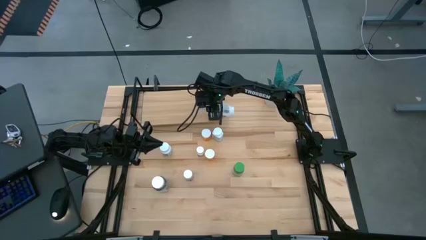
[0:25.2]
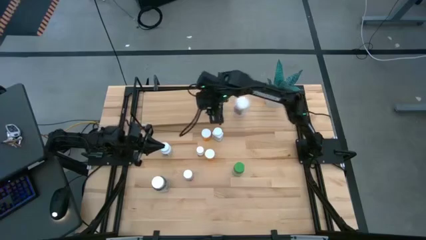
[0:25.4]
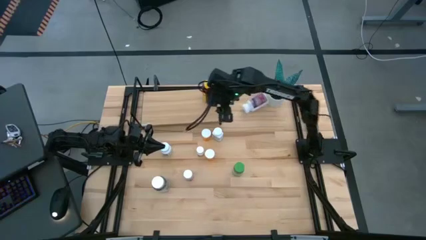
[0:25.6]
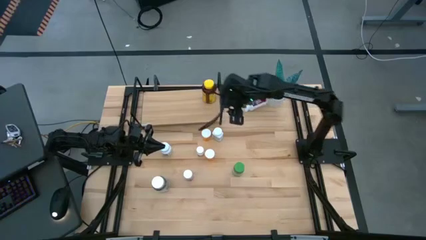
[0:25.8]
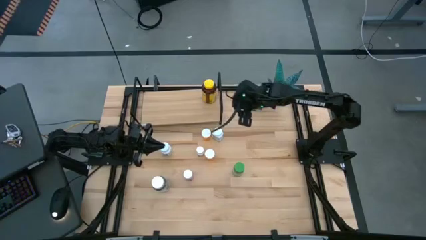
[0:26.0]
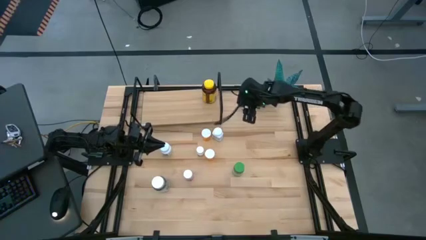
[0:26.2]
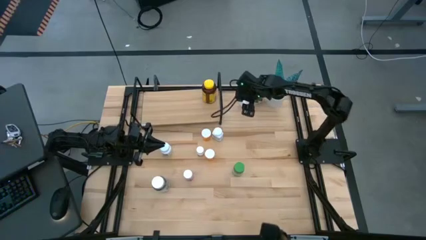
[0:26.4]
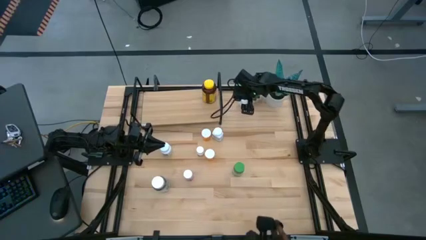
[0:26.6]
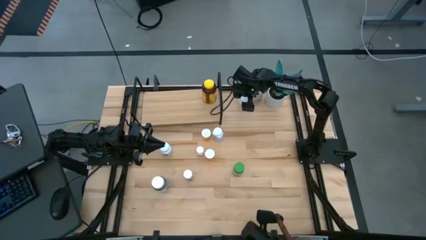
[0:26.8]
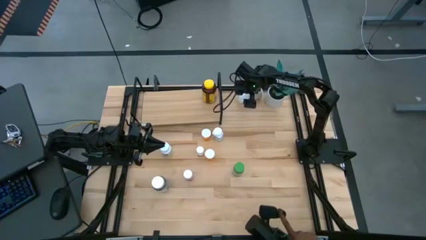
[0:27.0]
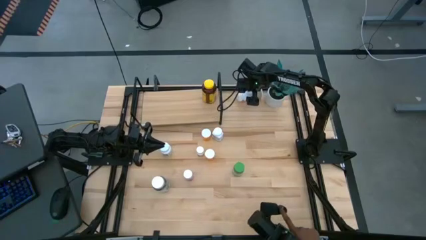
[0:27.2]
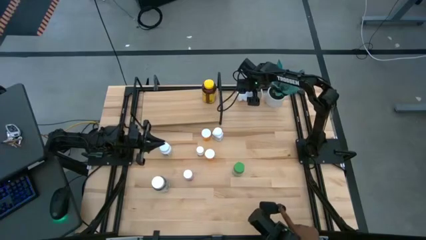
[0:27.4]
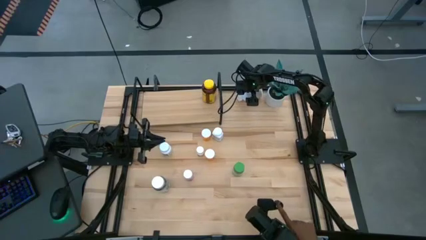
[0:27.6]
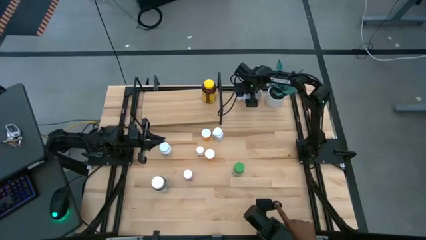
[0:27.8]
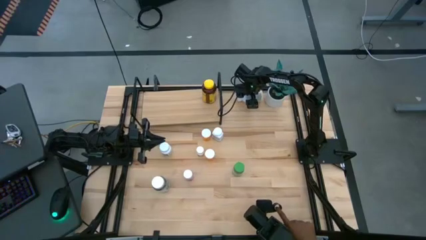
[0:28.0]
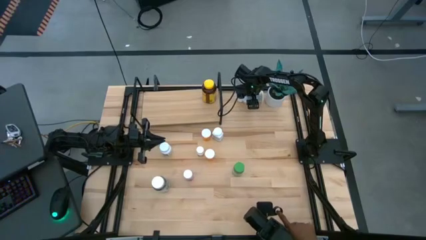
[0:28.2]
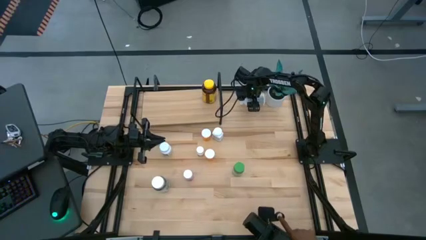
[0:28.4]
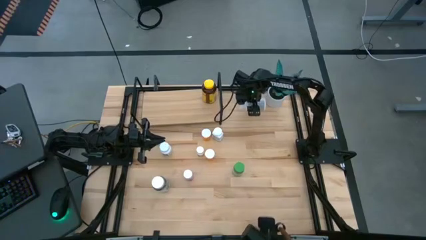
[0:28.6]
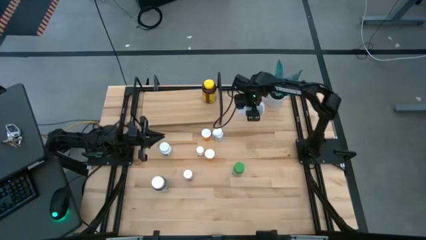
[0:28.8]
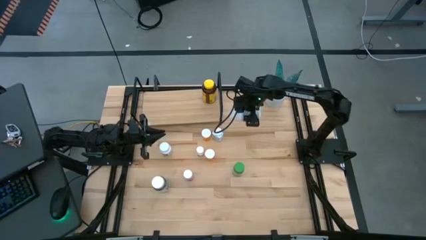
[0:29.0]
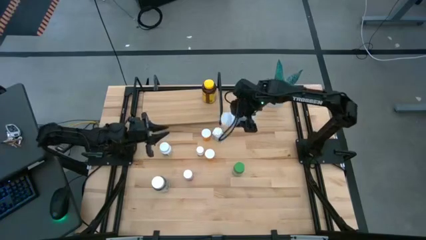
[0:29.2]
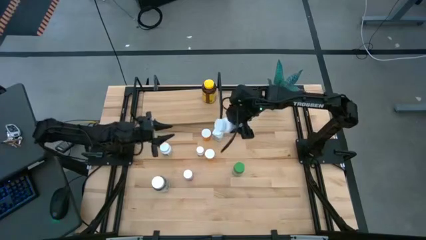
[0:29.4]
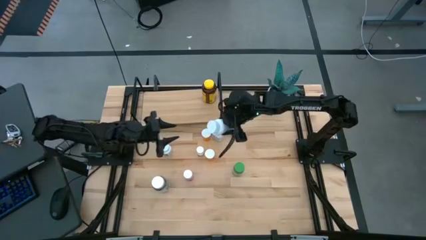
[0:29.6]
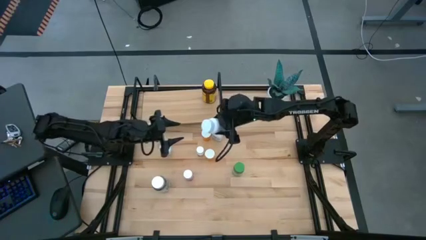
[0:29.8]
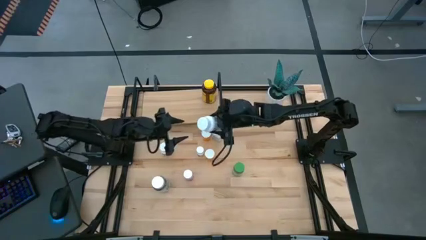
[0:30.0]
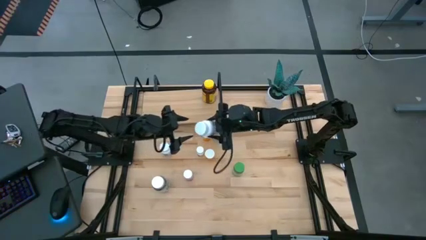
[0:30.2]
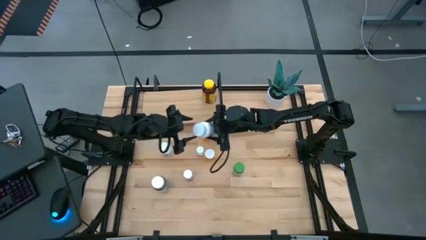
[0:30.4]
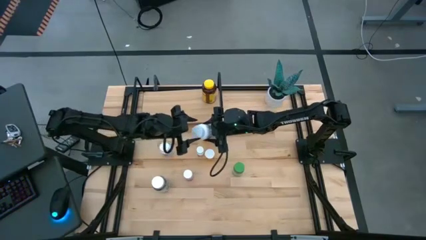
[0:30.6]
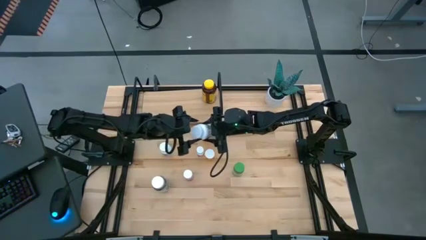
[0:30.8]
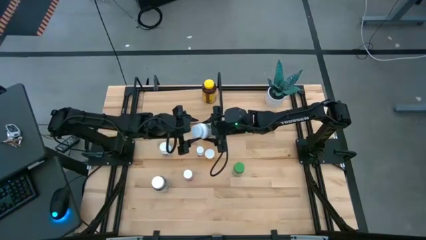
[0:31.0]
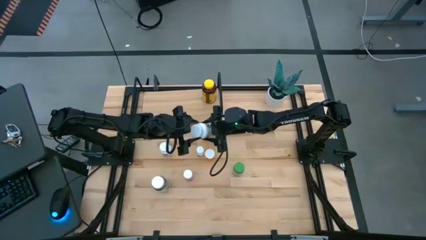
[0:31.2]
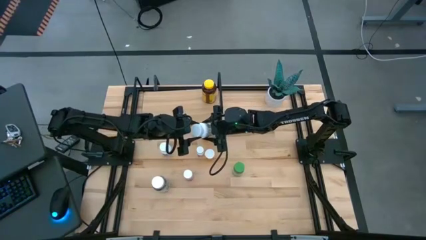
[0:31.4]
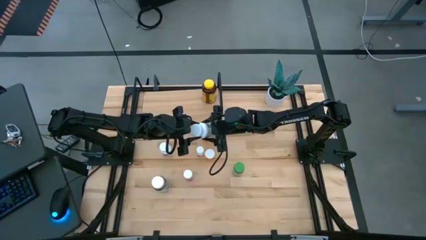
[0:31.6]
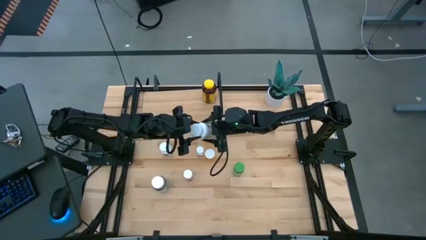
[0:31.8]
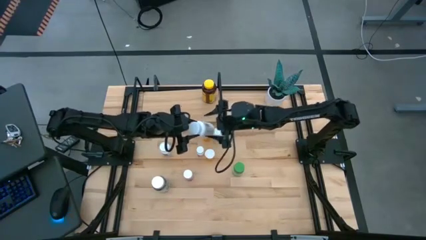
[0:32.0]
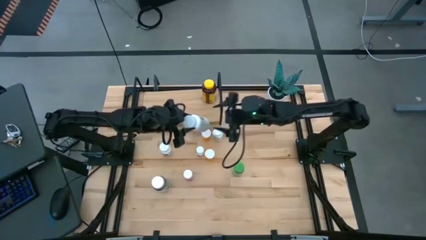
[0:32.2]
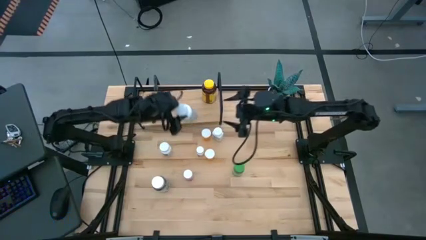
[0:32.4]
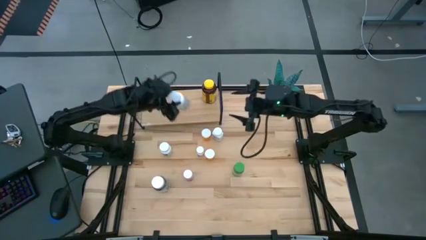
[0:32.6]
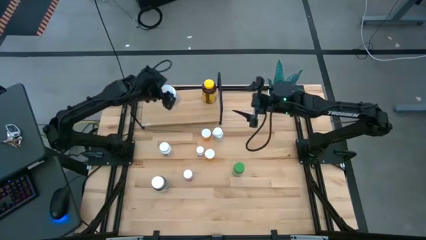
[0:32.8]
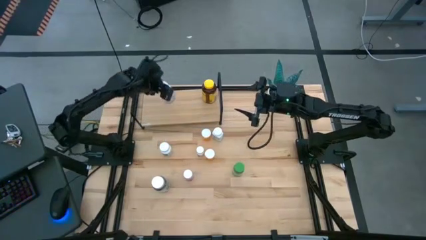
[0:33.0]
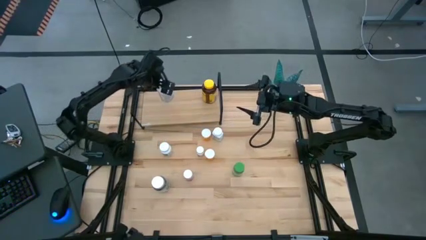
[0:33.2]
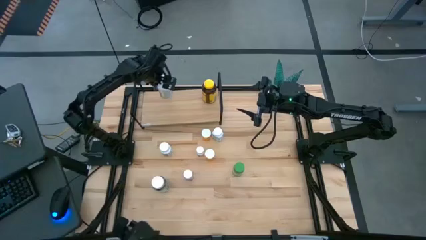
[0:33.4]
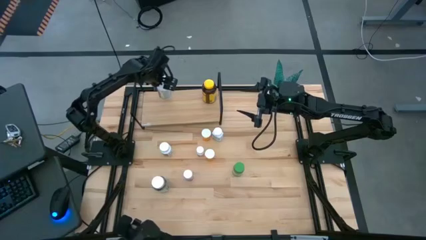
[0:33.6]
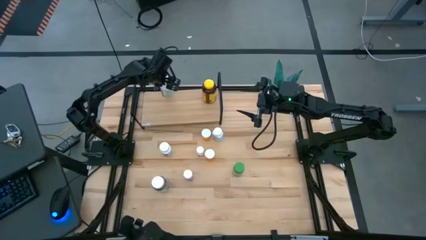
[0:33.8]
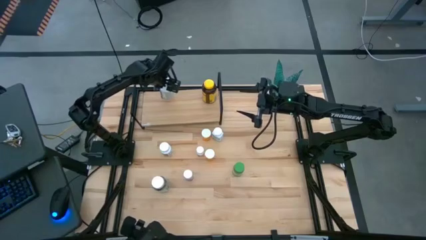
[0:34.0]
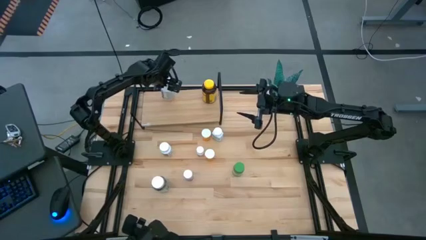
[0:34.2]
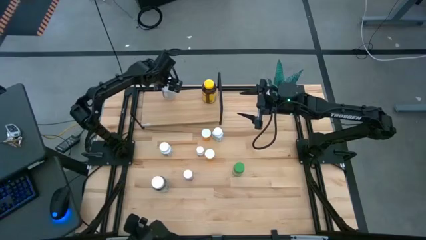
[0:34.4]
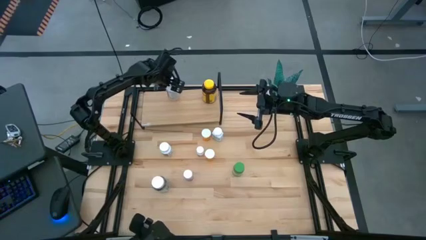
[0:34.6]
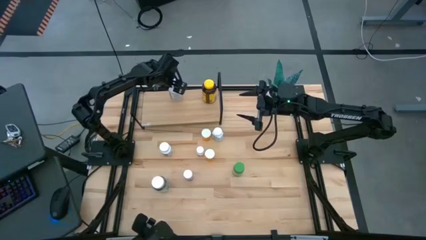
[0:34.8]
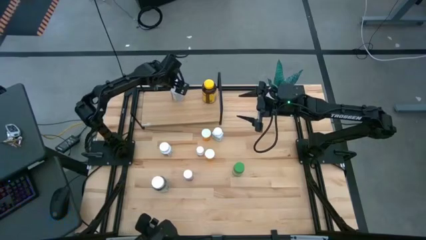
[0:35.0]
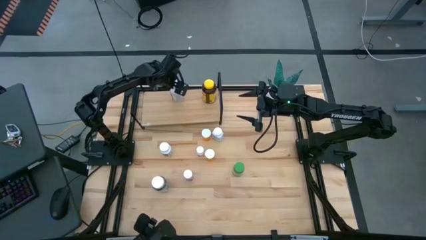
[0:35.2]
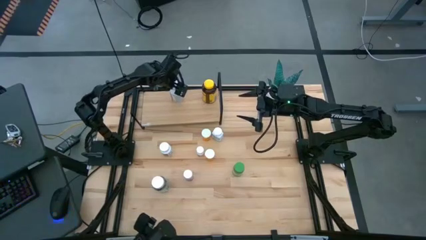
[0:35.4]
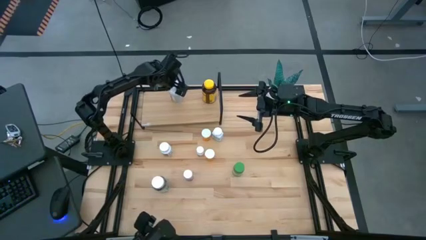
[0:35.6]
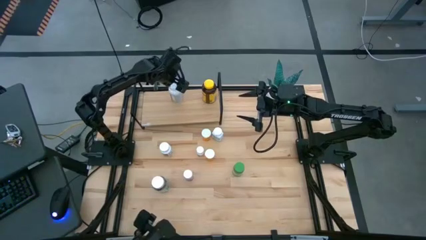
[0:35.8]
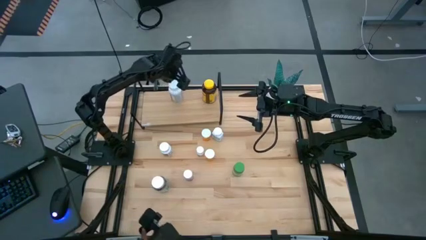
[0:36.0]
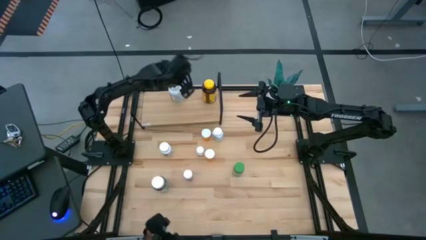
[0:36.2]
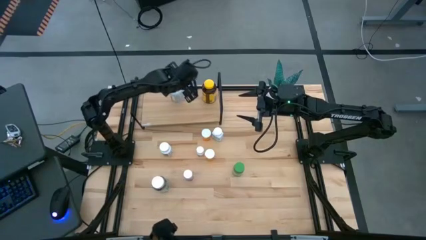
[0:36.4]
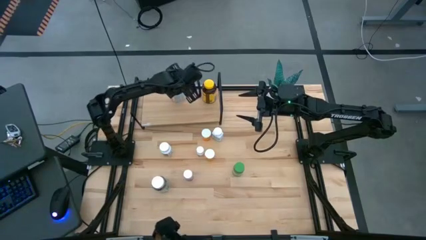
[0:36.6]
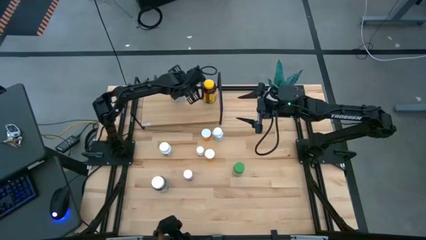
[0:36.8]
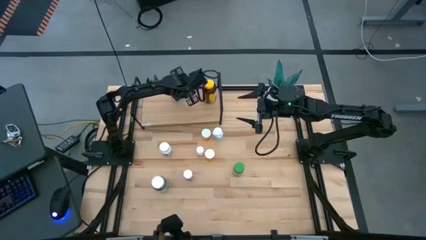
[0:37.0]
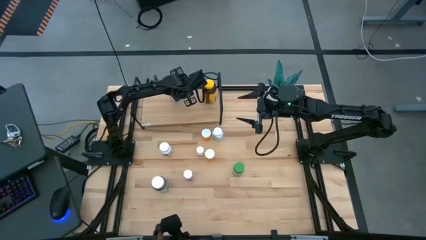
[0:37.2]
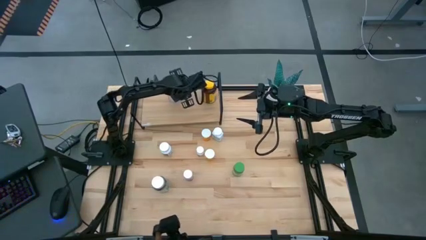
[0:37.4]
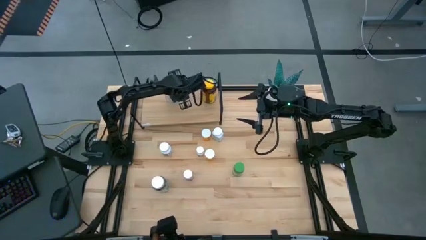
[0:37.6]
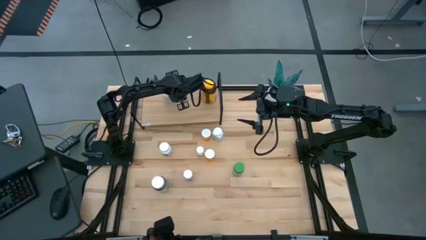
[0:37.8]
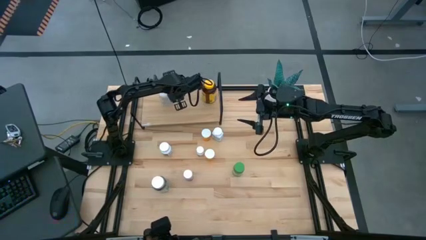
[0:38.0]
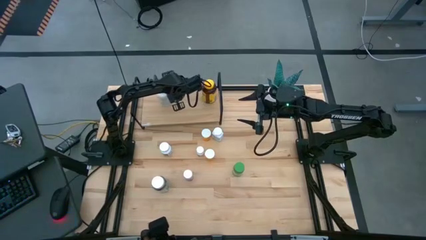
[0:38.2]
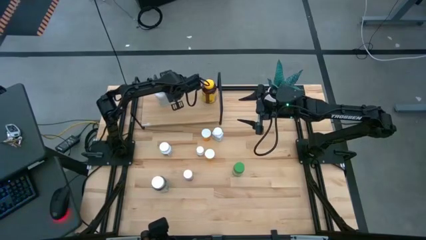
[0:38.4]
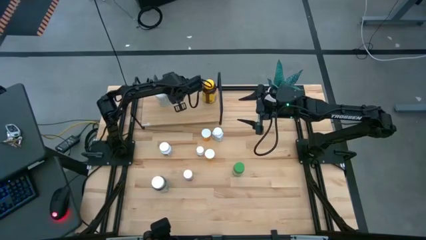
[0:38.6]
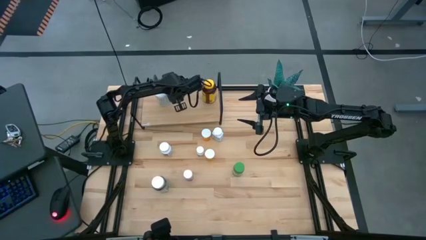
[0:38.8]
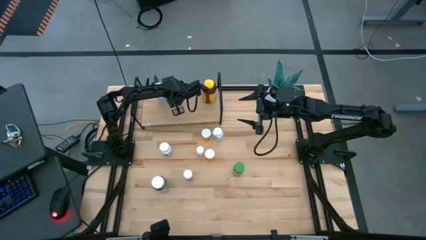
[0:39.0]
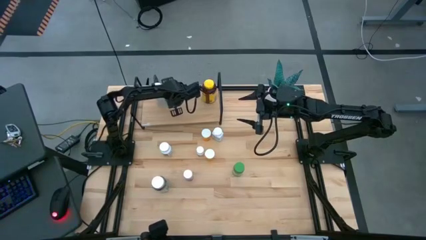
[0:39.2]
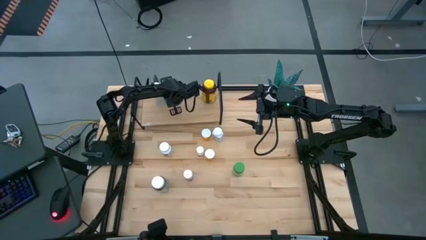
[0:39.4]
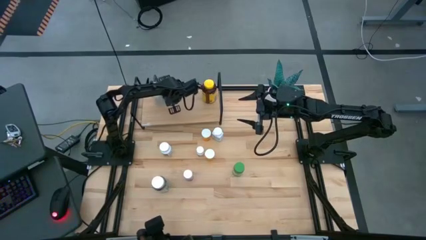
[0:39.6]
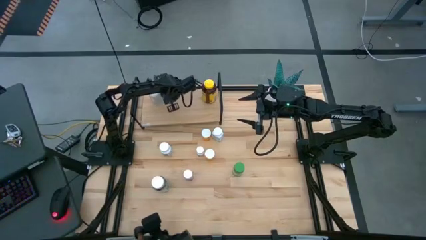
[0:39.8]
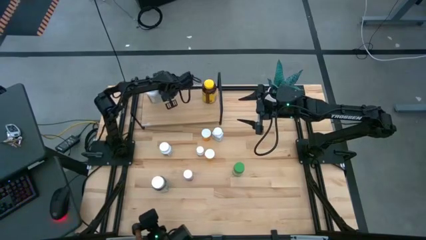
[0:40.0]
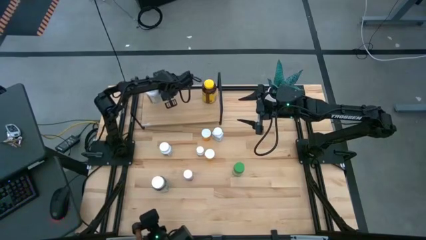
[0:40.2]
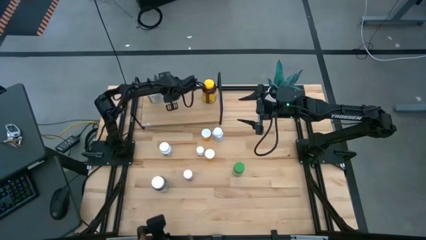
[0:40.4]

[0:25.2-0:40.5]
Task: Pick and place medicine bottles onto shelf by color
Put the white and purple pill bottle on the shelf

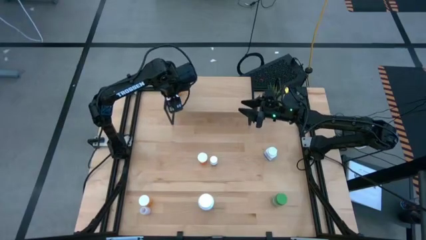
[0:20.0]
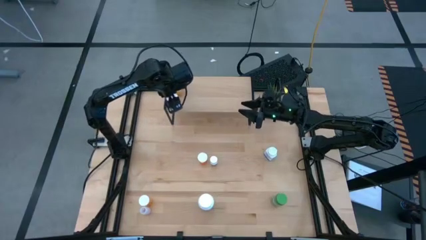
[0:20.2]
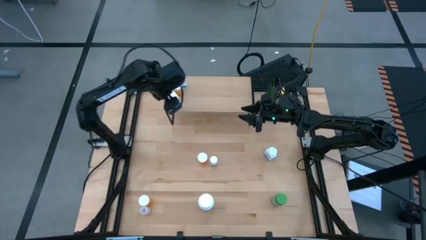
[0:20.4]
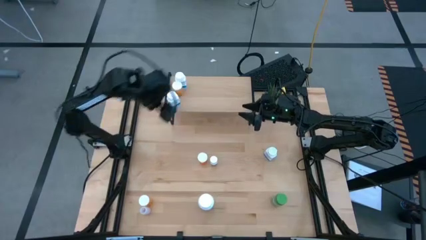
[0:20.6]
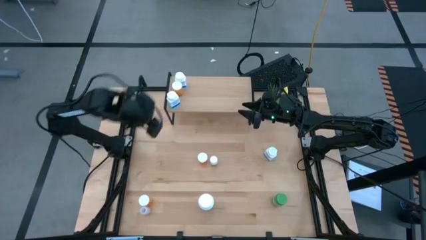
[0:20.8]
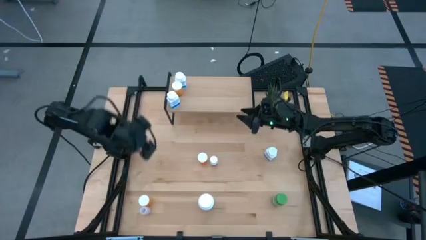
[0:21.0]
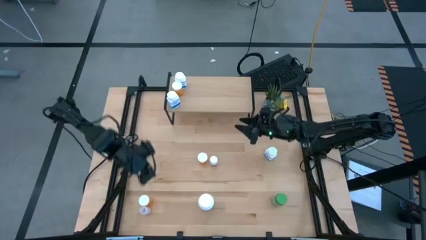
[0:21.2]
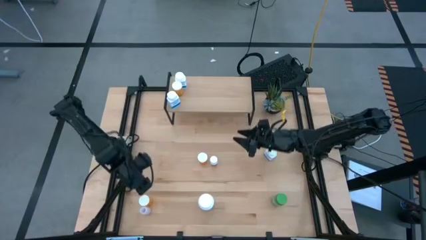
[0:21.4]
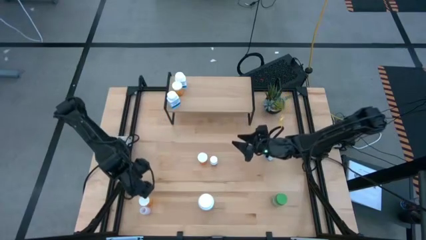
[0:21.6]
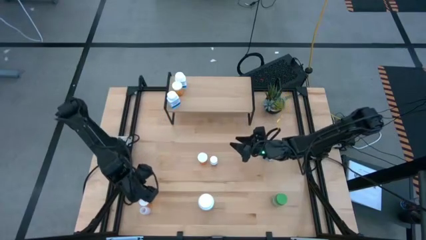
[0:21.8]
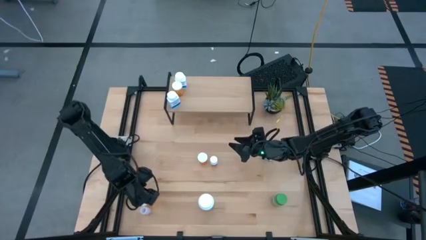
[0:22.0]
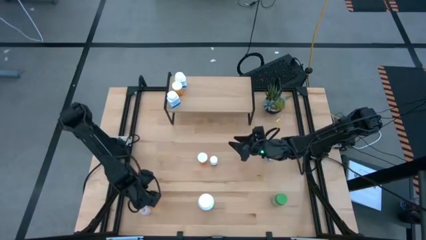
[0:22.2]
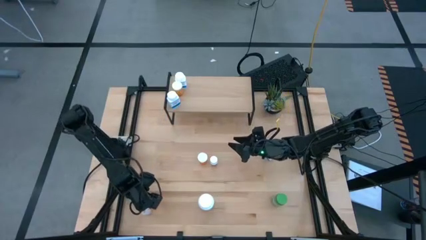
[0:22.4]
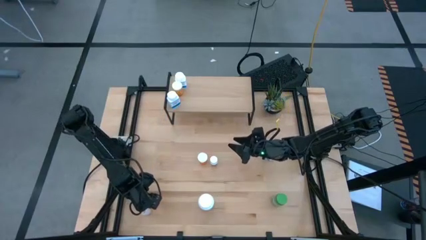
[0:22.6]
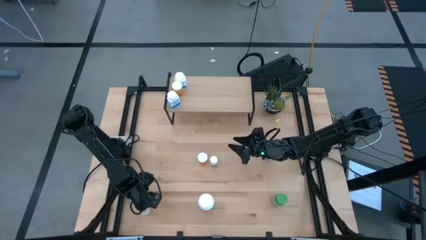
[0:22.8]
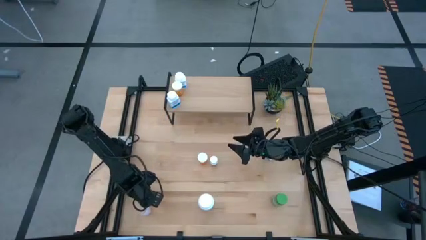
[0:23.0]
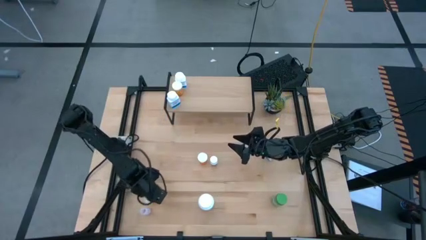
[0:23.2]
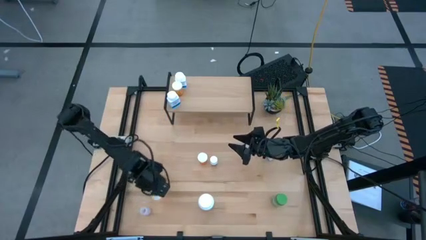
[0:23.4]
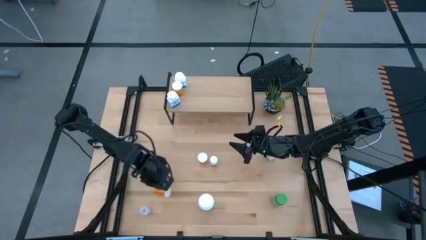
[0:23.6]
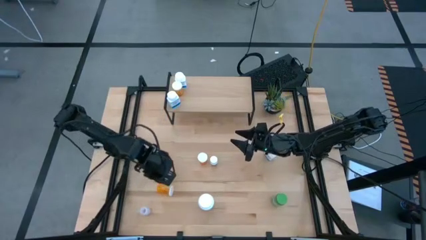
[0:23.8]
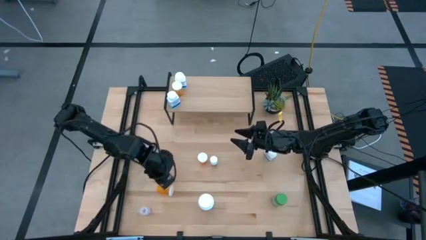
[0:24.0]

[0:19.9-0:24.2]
Task: Pick and place medicine bottles onto shelf by color
Put the bottom left orange pill bottle on the shelf
